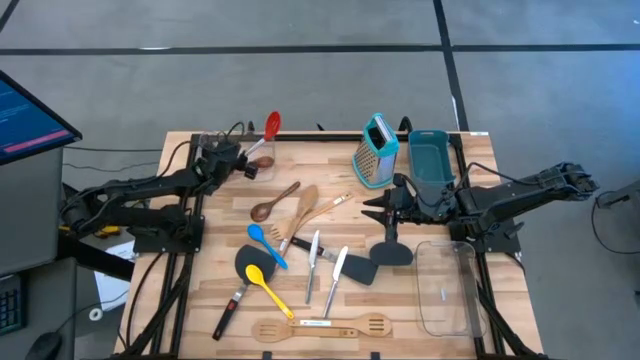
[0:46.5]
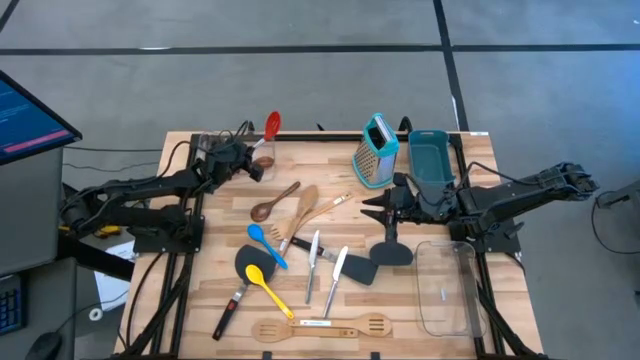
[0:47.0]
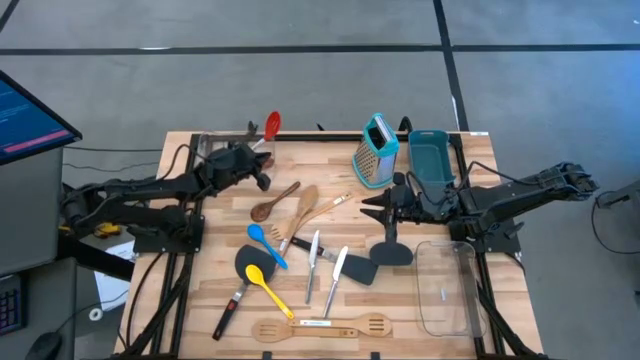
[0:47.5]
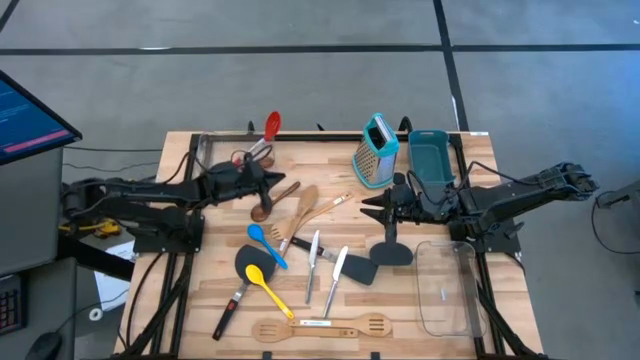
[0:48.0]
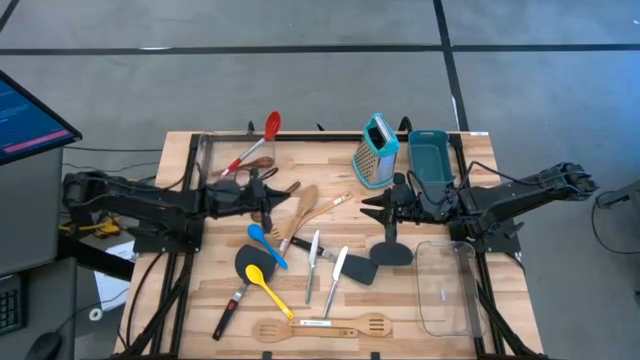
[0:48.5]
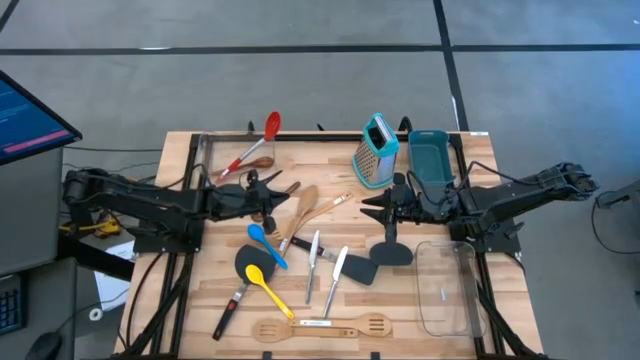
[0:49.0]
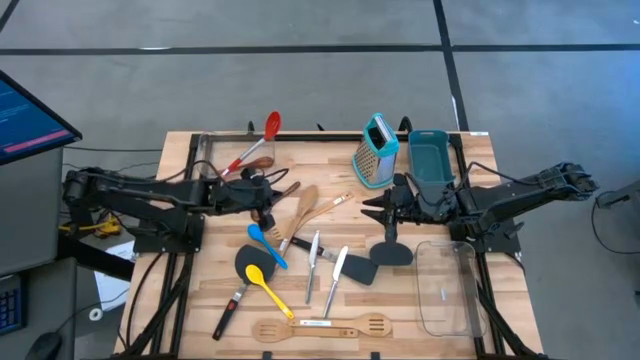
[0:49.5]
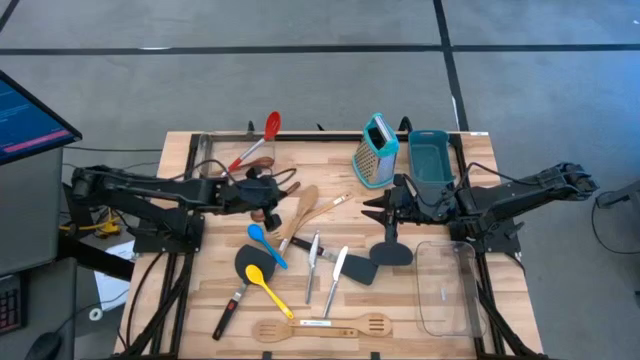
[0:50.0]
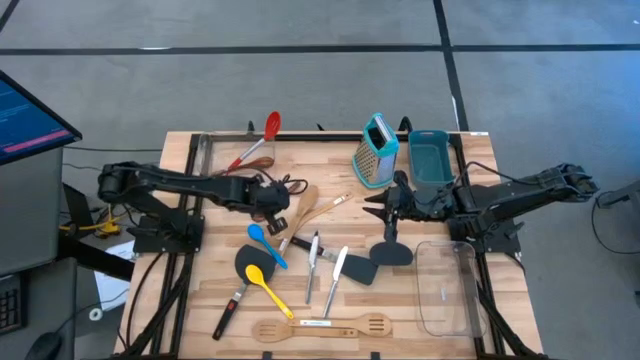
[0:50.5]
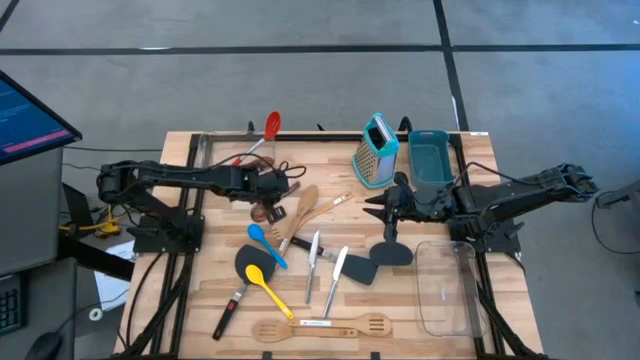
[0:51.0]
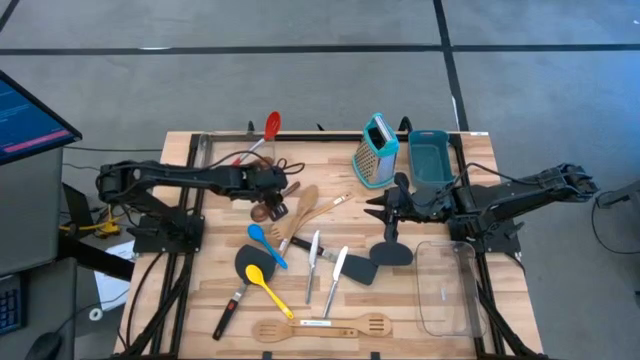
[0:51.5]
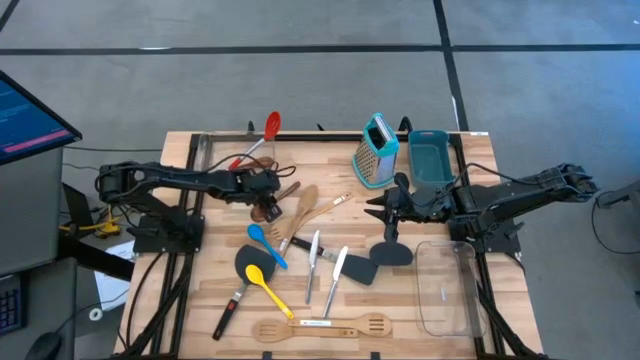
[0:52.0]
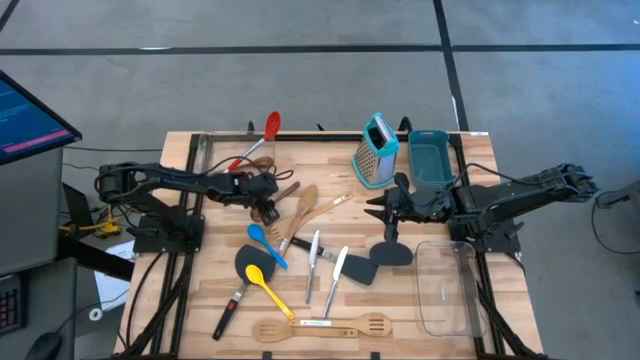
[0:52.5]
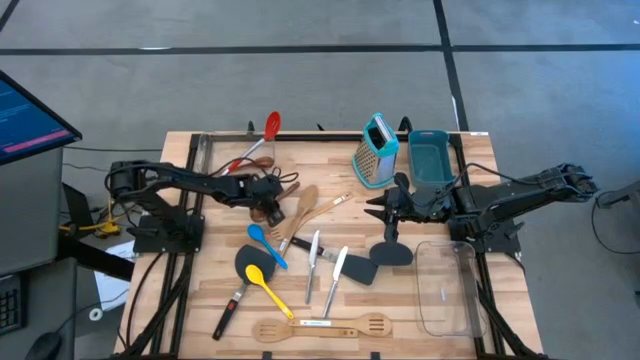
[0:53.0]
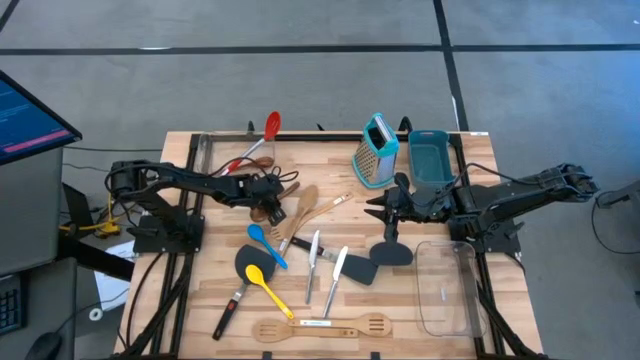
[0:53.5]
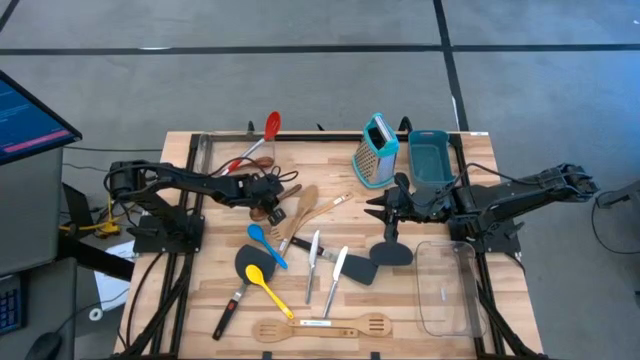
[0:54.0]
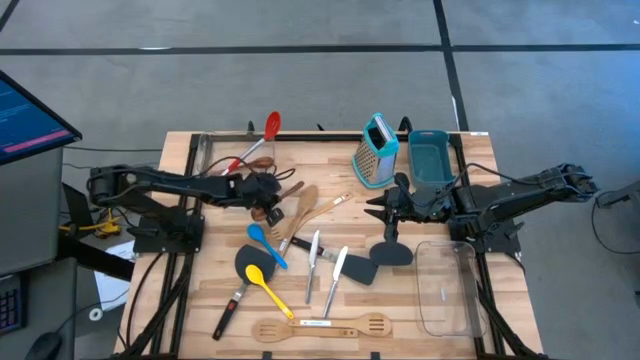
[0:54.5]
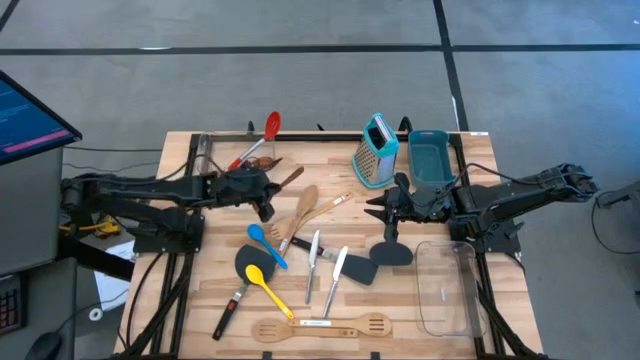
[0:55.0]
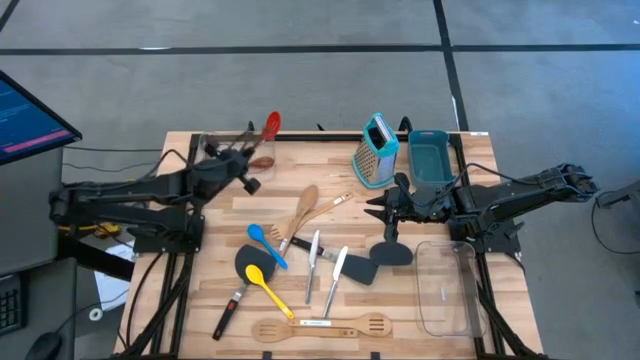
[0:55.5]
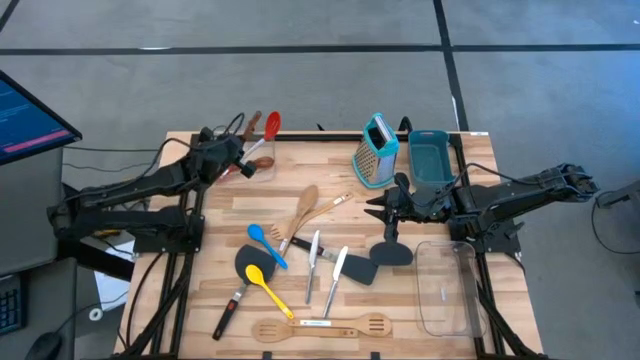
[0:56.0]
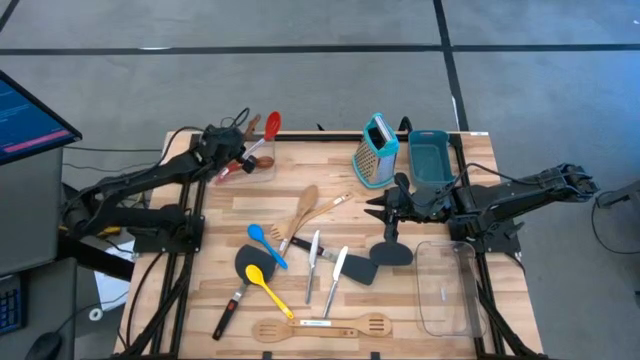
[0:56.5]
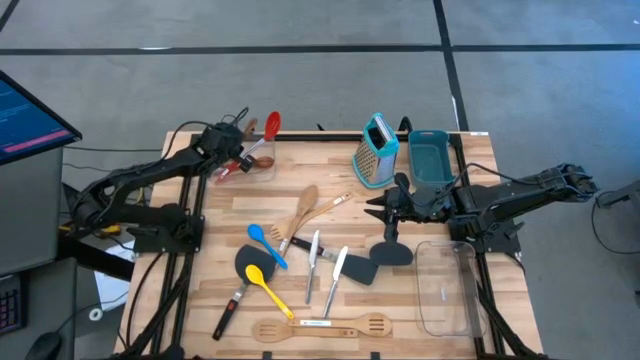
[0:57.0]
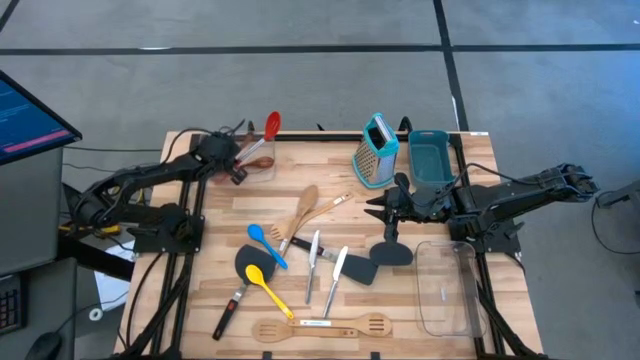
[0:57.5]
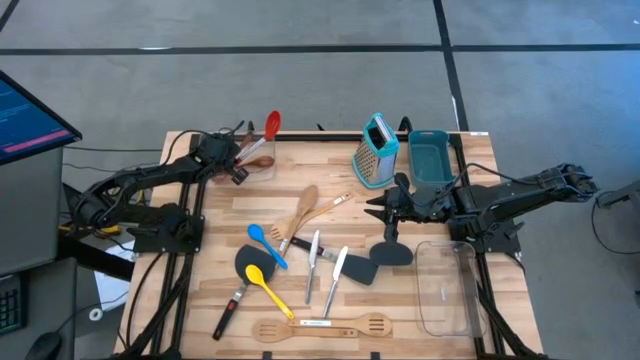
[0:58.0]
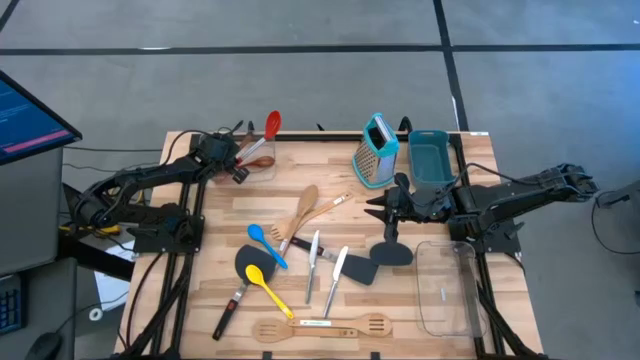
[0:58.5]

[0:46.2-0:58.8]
Task: Pick & Place Kitchen Items
Put the dark brown wooden spoon into the left transparent bin

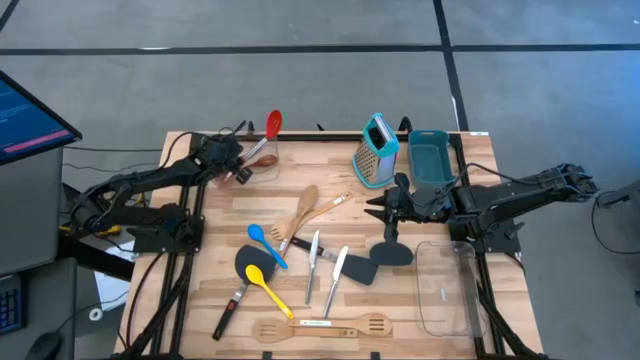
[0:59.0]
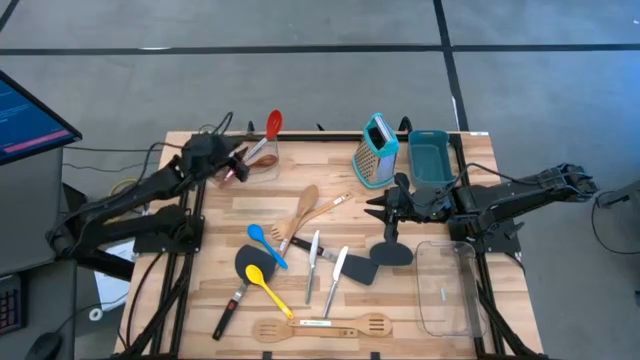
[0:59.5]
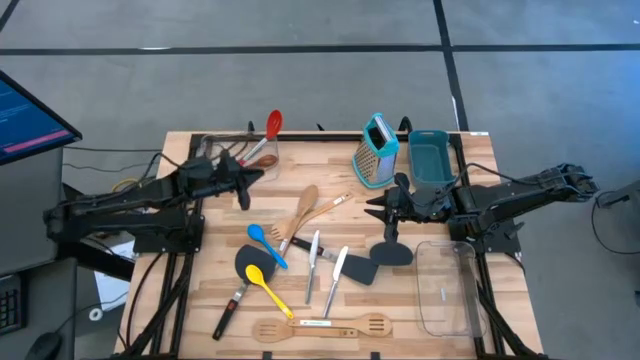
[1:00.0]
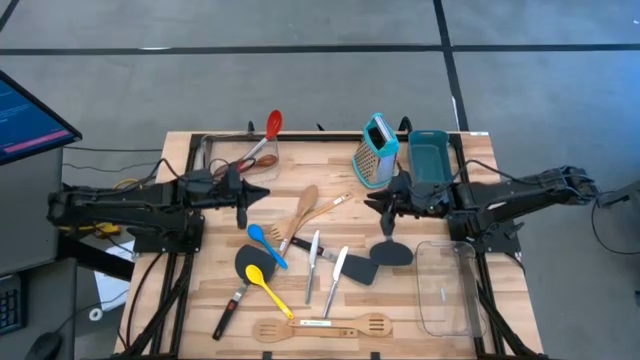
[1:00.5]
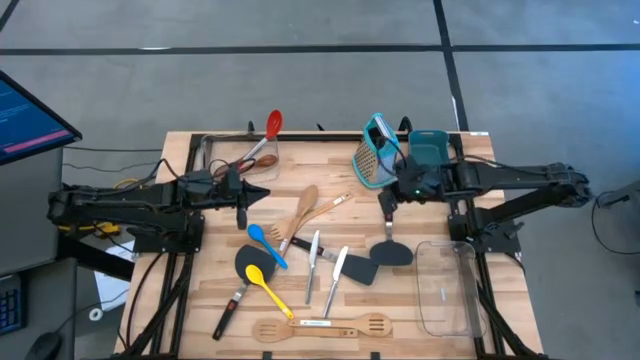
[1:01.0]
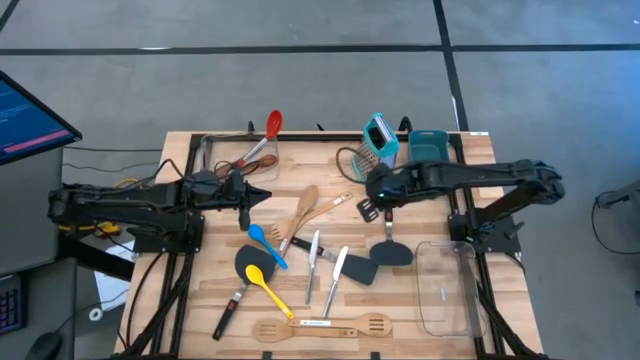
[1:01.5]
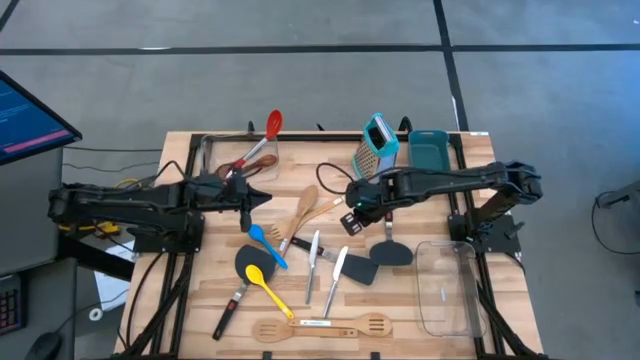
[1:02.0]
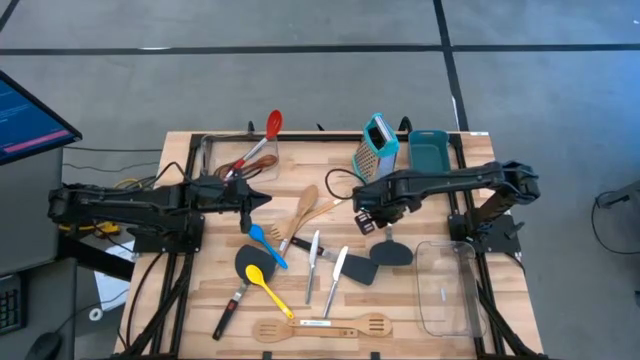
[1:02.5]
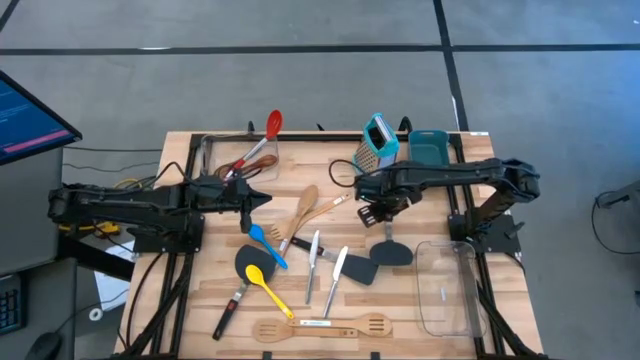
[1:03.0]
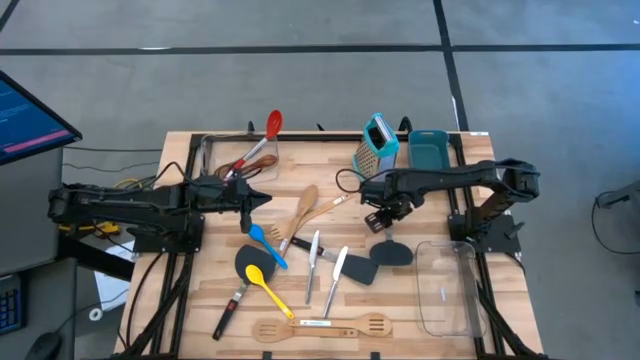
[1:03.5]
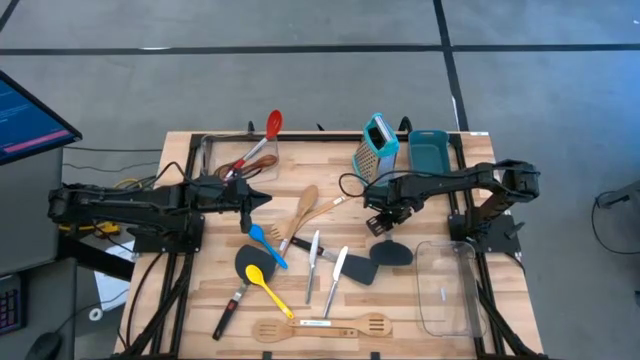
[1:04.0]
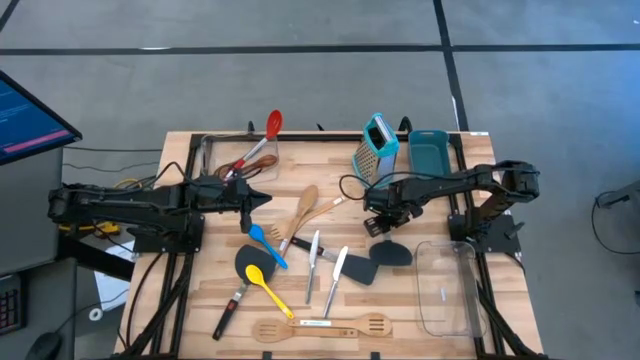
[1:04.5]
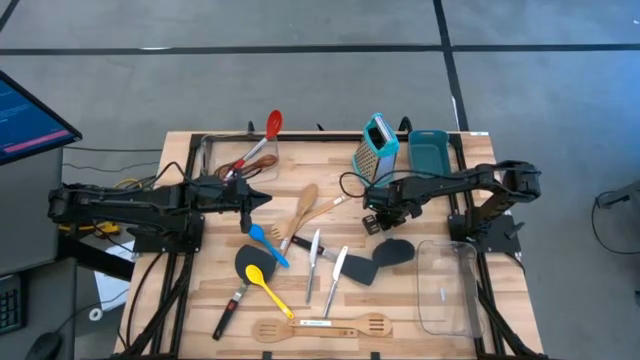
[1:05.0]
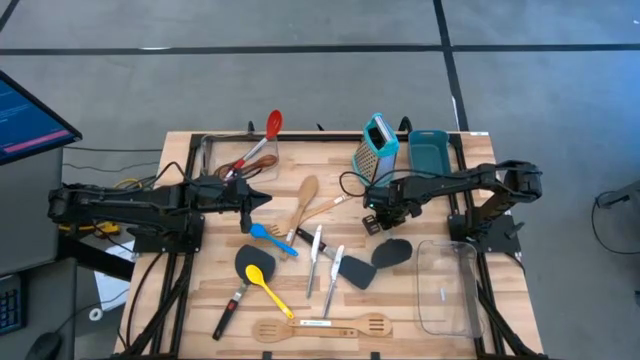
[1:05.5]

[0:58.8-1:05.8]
Put the right black turner spatula into the right transparent bin

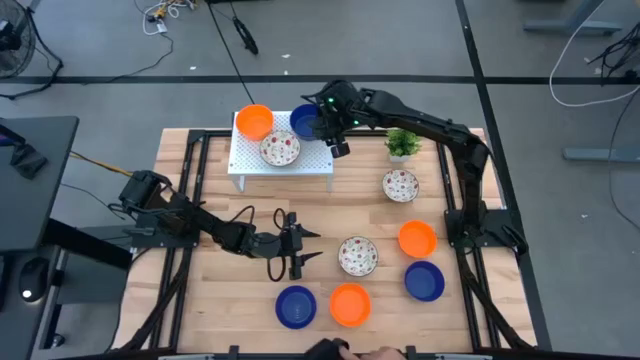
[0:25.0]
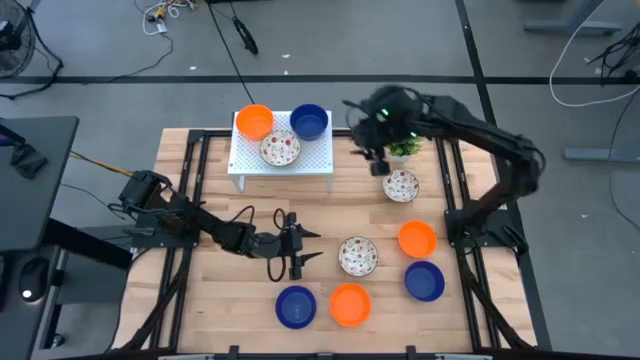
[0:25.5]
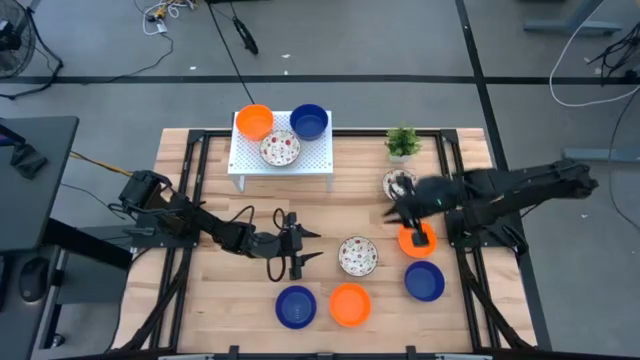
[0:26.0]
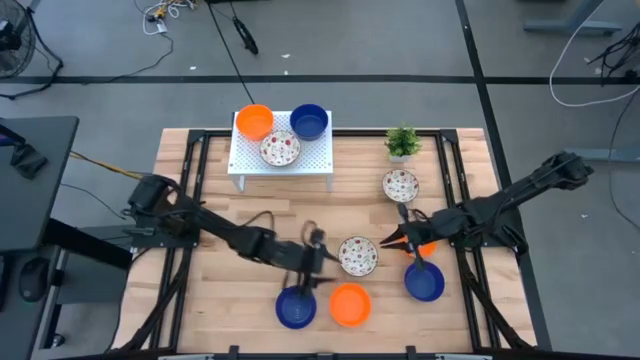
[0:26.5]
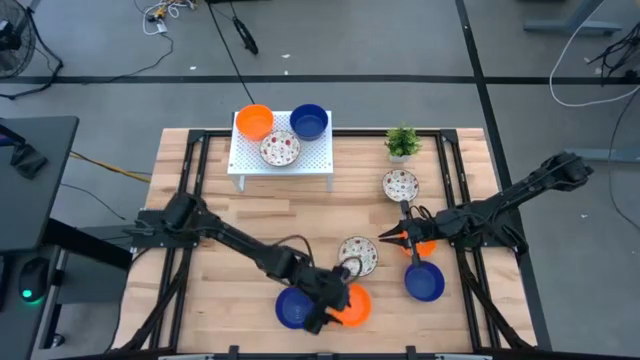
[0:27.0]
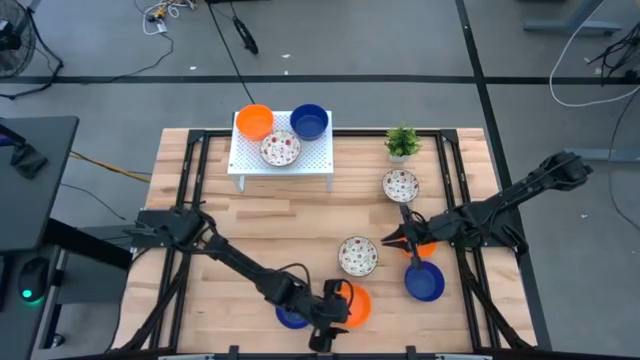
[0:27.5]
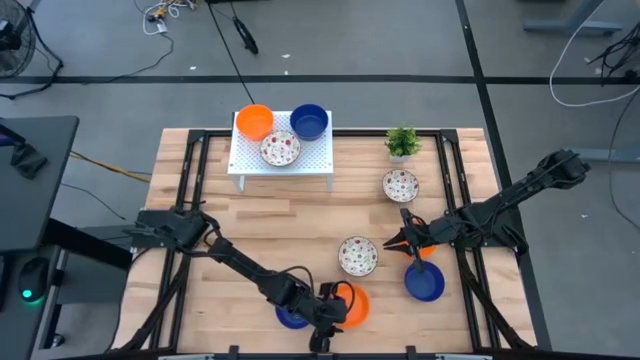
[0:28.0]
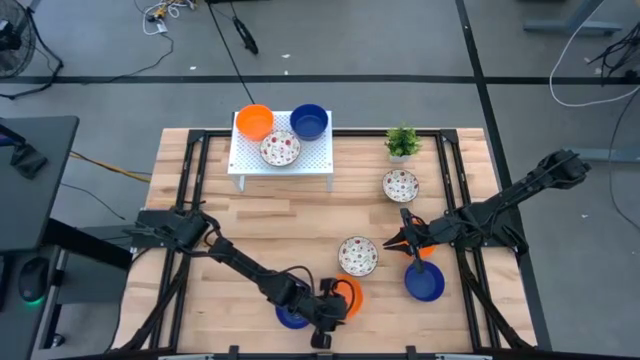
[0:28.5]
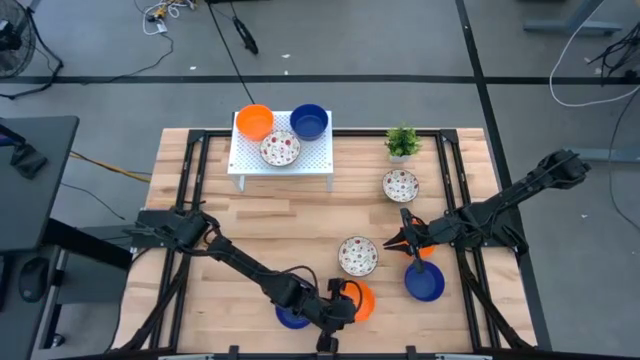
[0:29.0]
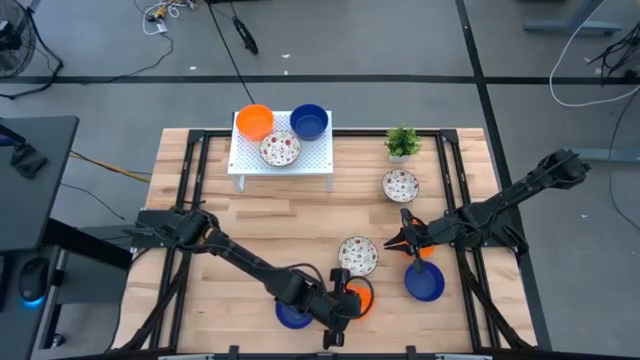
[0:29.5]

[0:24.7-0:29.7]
Task: Pick & Place Mini bowls
Stack the orange bowl on top of the orange bowl on the shelf
